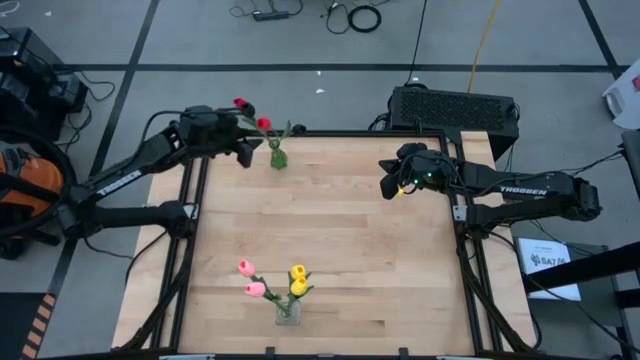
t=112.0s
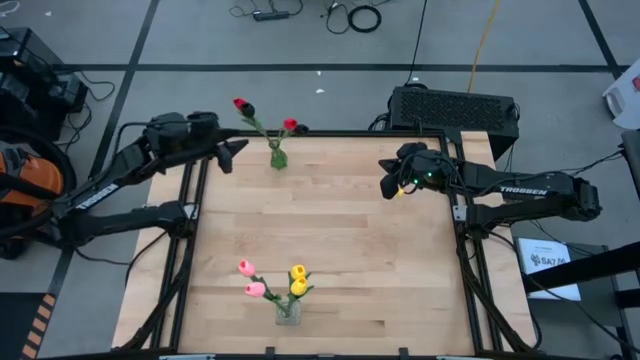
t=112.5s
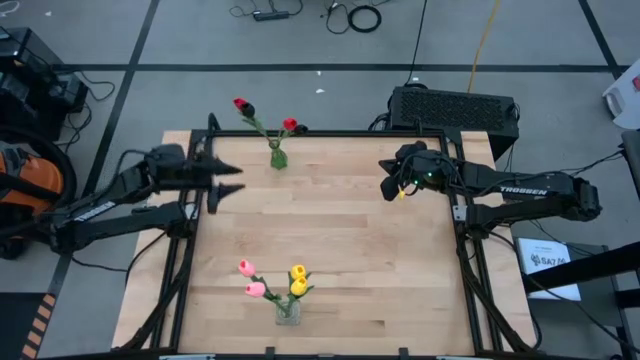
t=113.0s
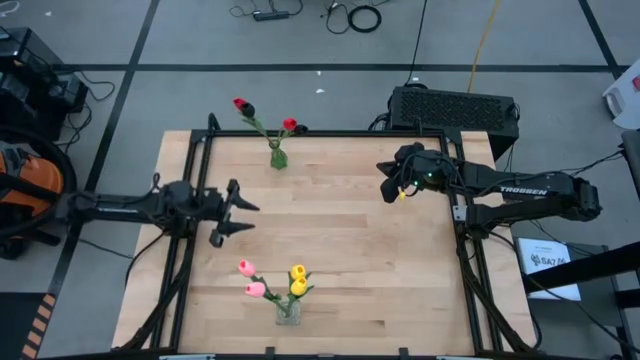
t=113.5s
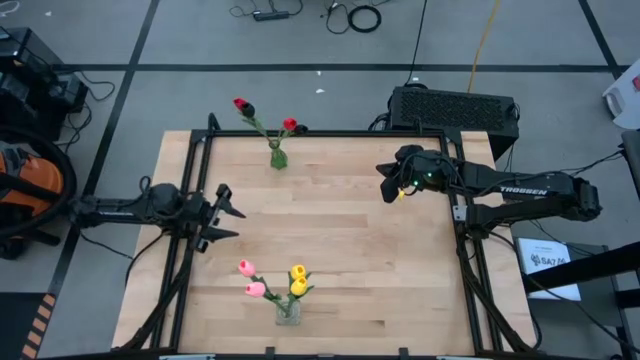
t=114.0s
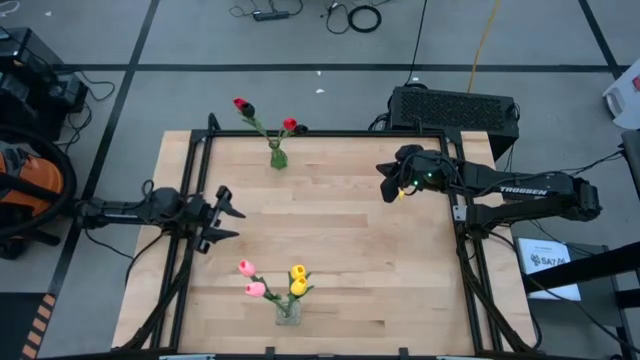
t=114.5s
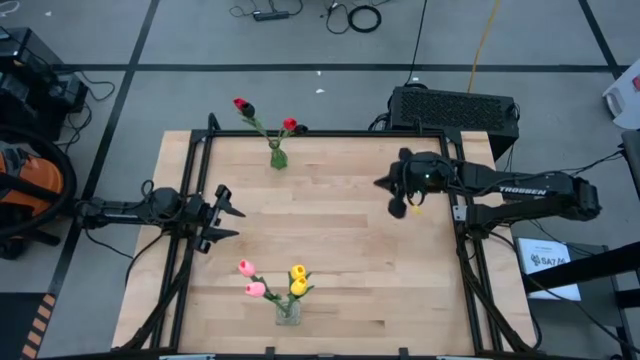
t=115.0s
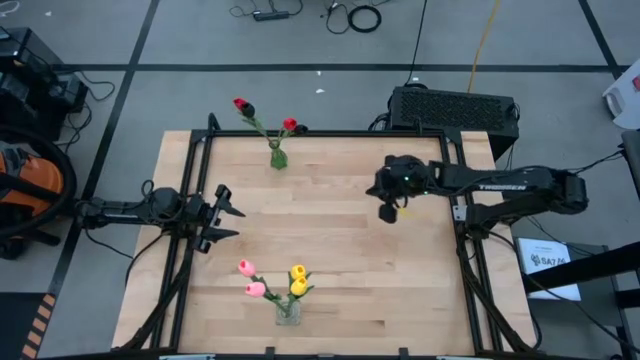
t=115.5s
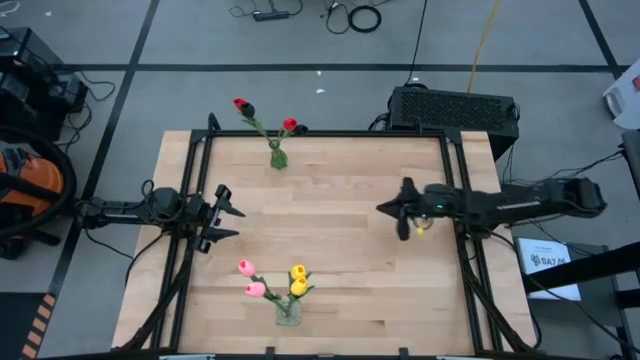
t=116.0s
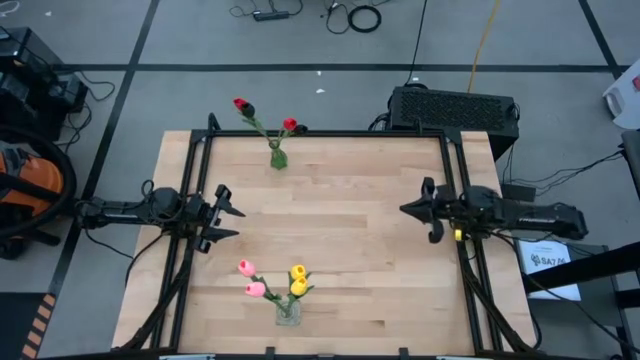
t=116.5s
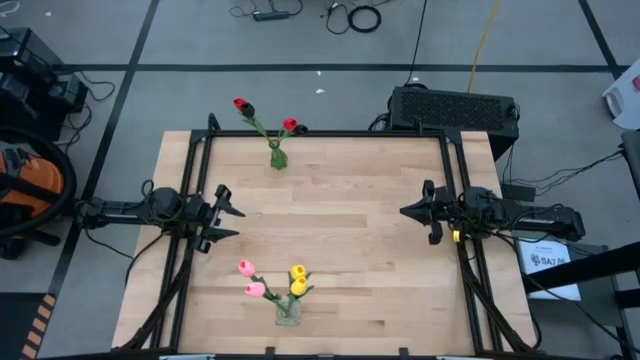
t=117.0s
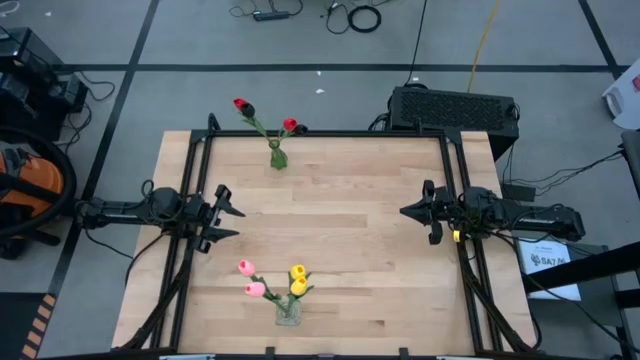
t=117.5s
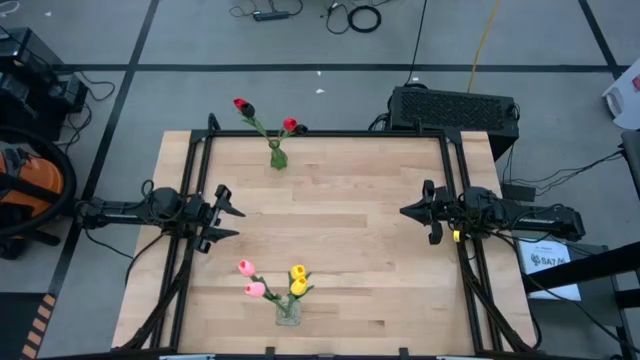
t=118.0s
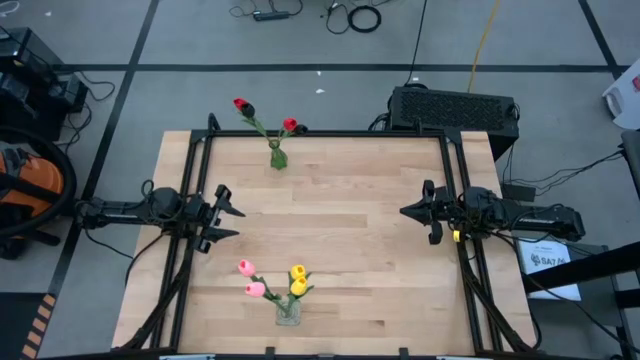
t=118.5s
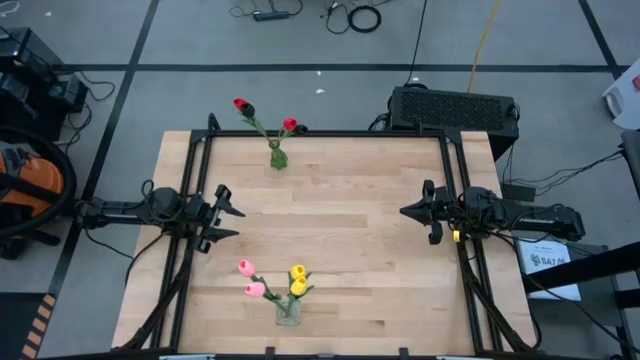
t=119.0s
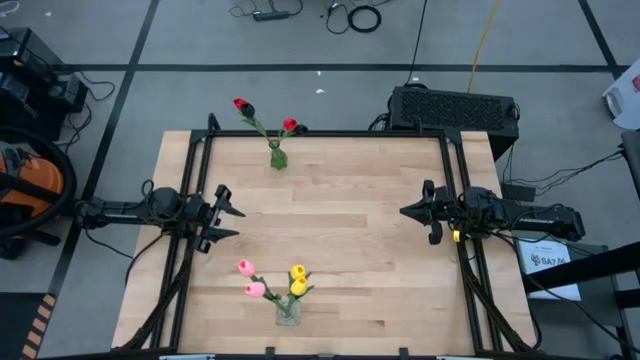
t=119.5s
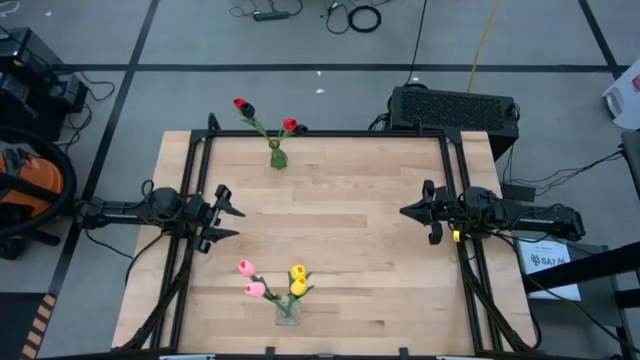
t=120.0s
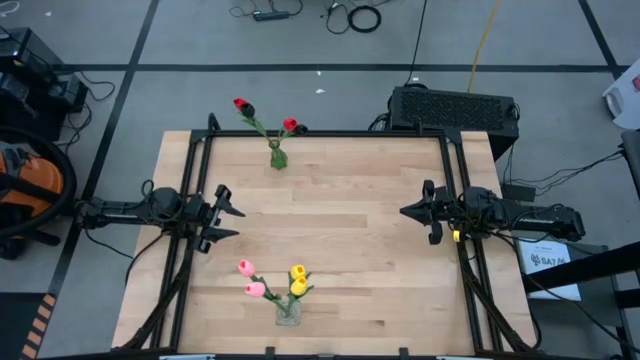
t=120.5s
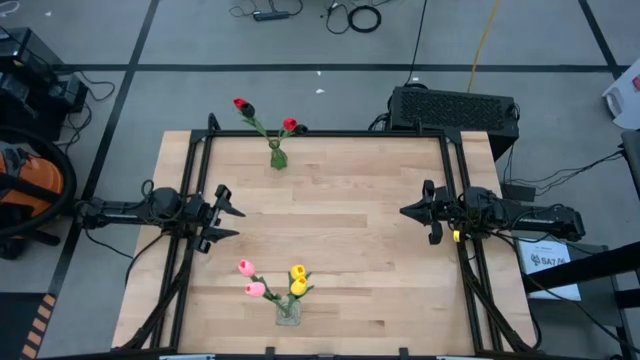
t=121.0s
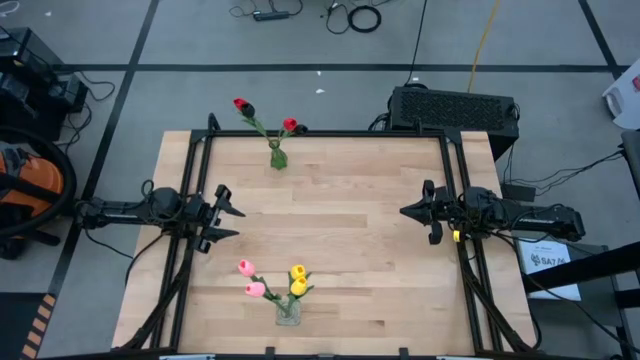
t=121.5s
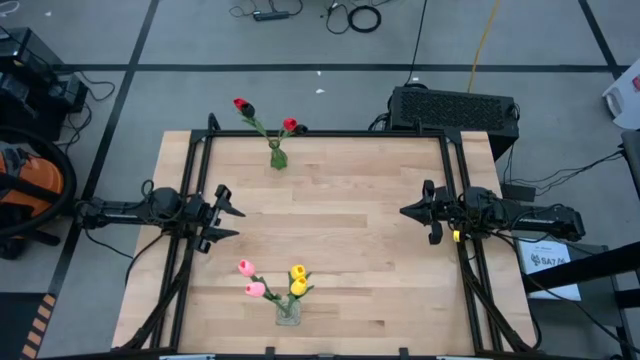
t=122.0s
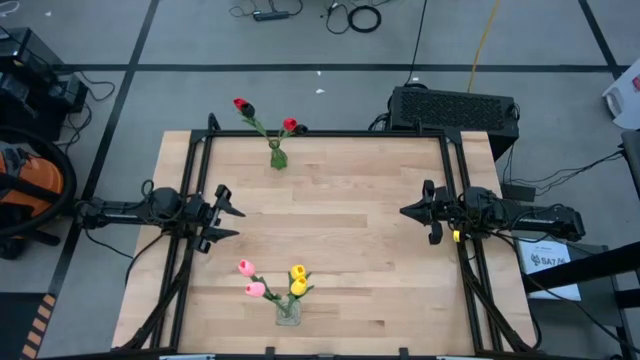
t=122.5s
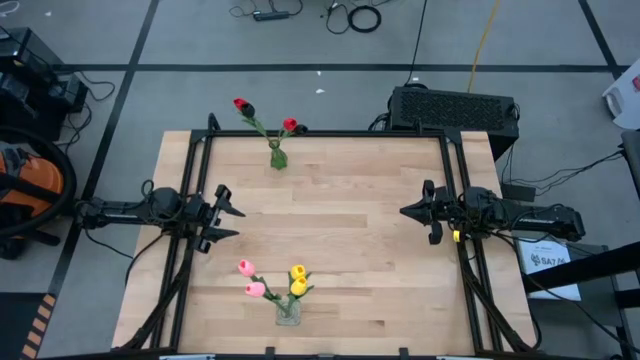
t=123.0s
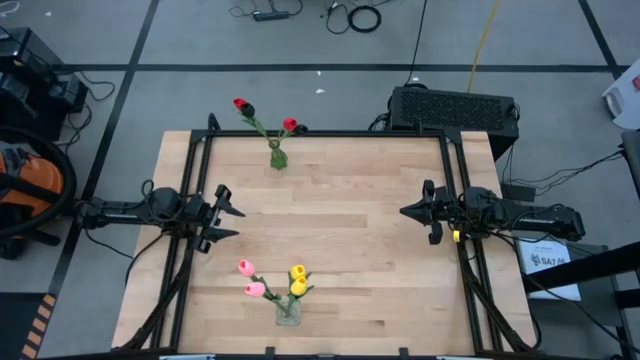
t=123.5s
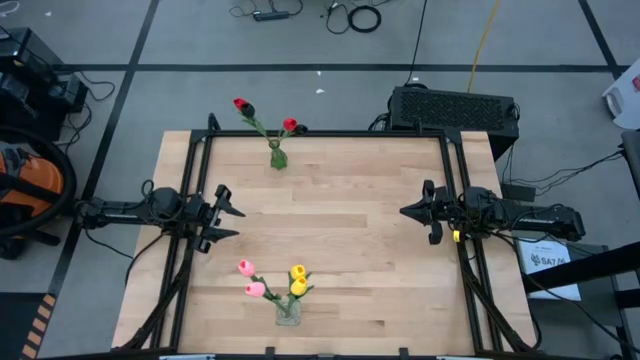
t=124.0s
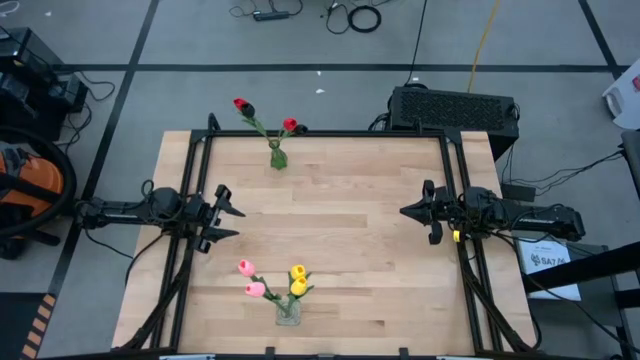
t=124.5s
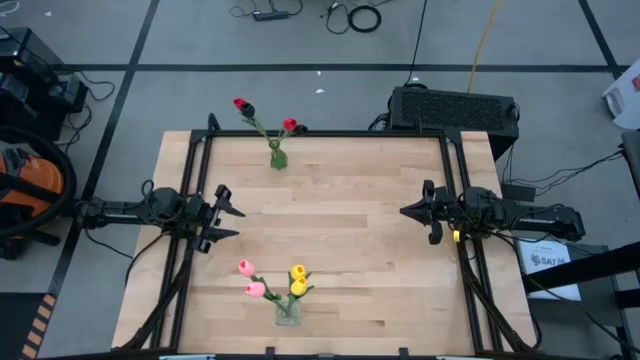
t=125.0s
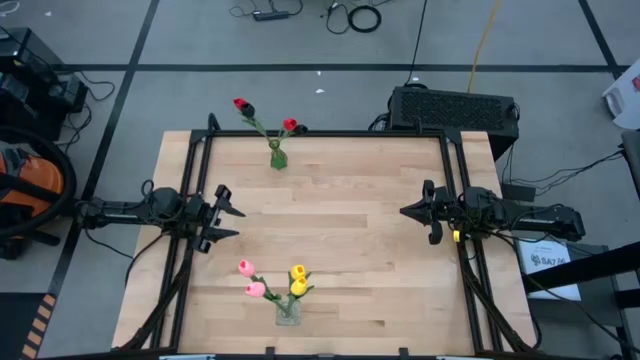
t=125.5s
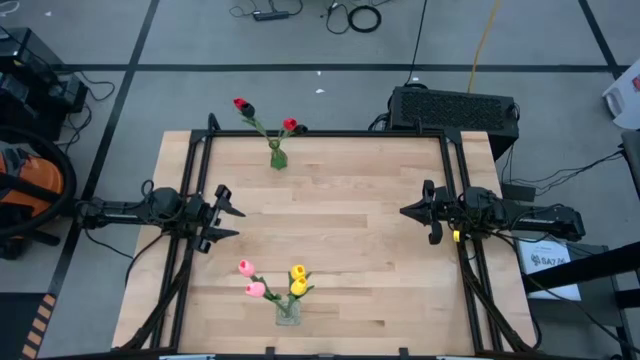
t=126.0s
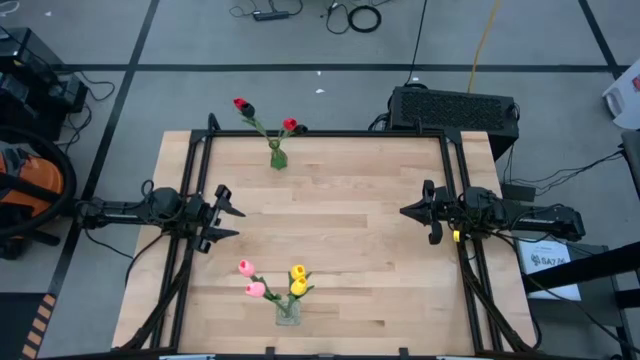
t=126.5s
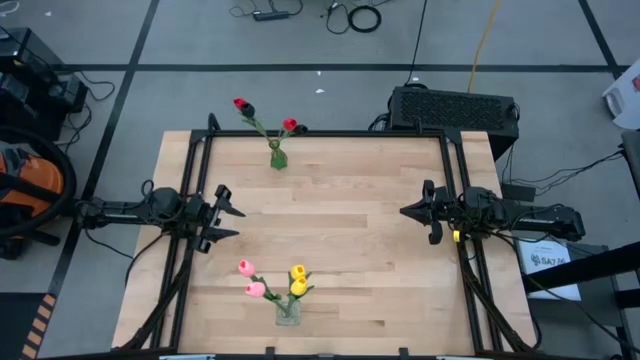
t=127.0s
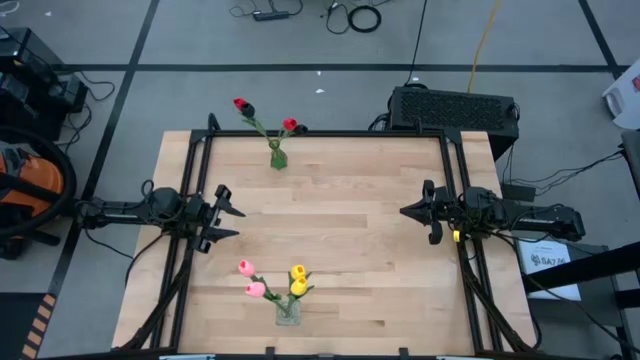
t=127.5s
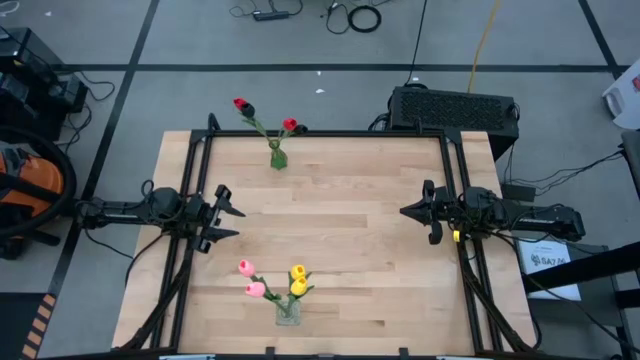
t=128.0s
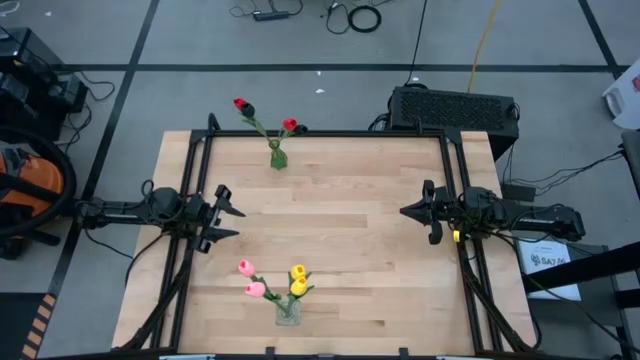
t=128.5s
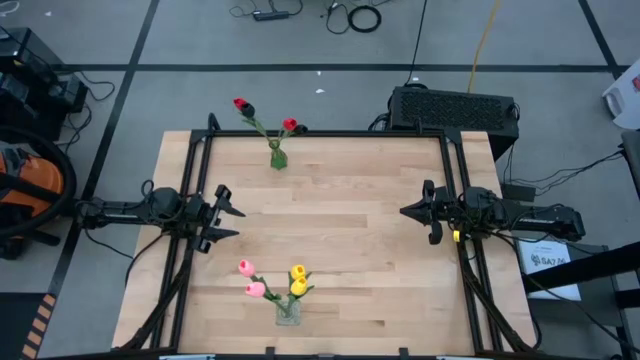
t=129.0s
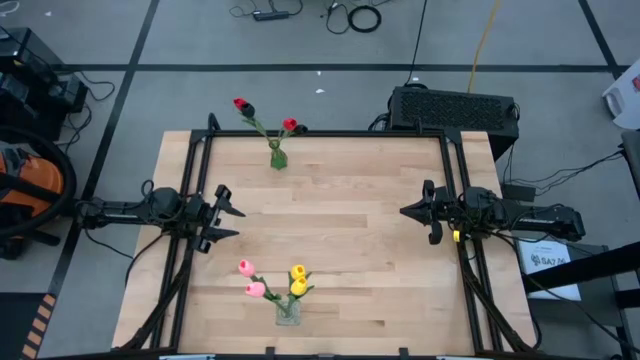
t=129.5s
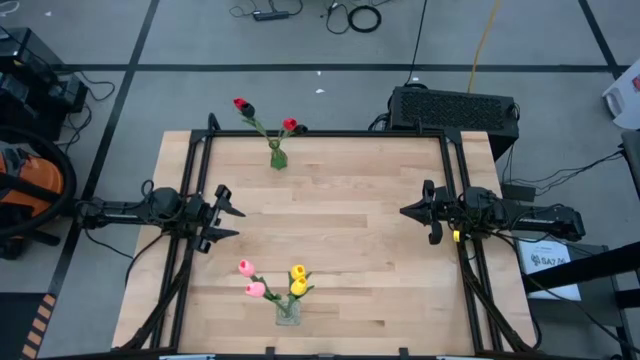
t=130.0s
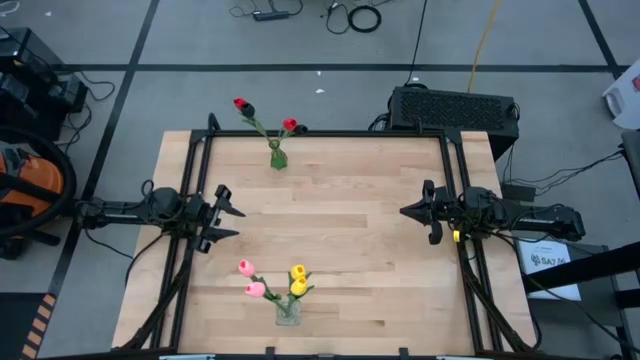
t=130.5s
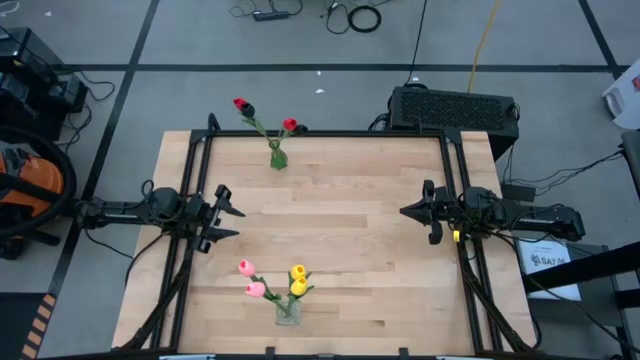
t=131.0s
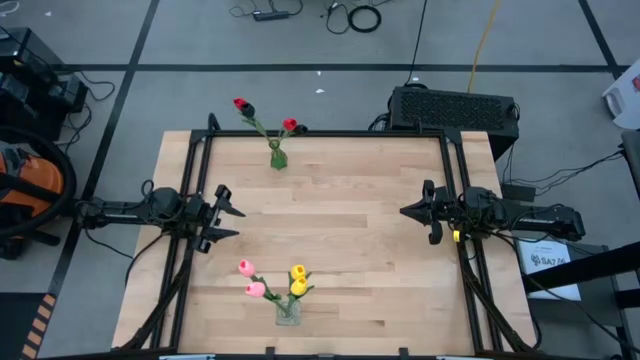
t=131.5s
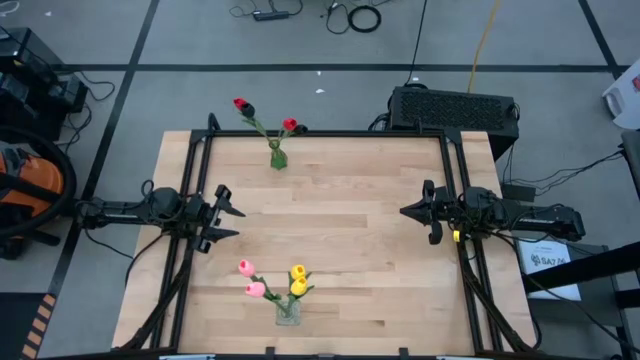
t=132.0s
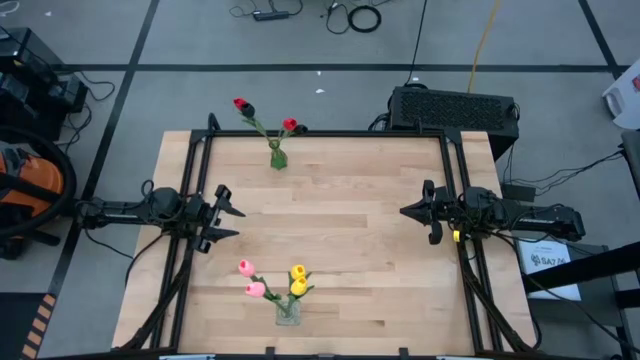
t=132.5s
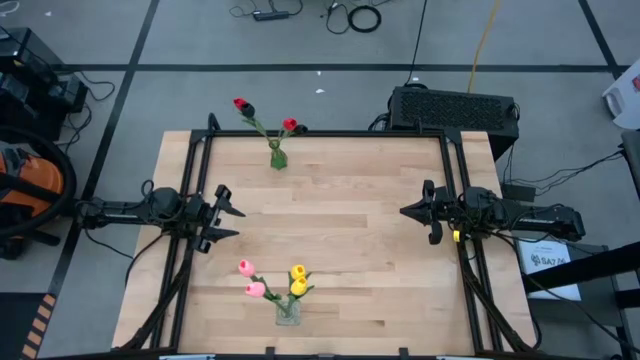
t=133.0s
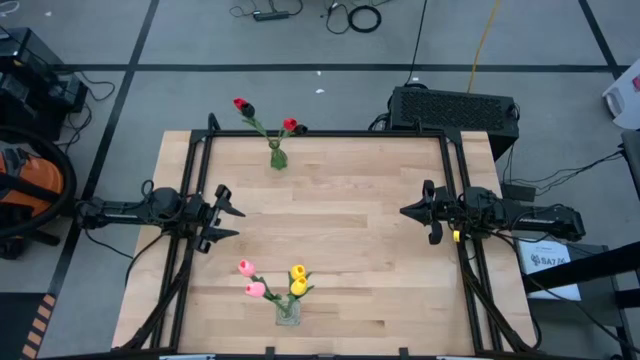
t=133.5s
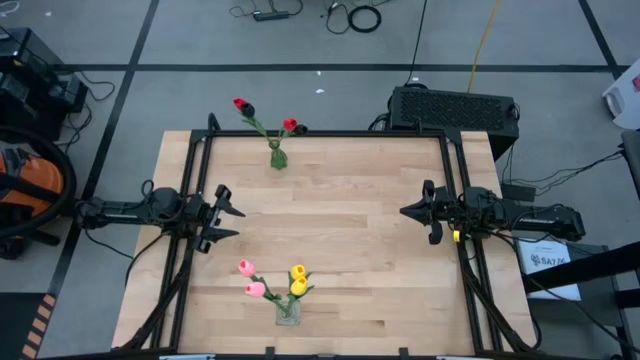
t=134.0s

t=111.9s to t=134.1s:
Task: Sort flowers into vase by color
Return to Home Position
